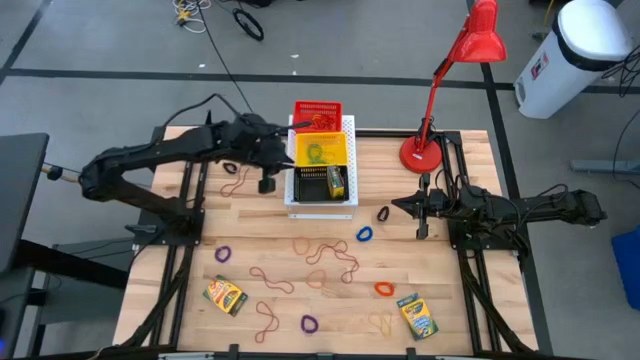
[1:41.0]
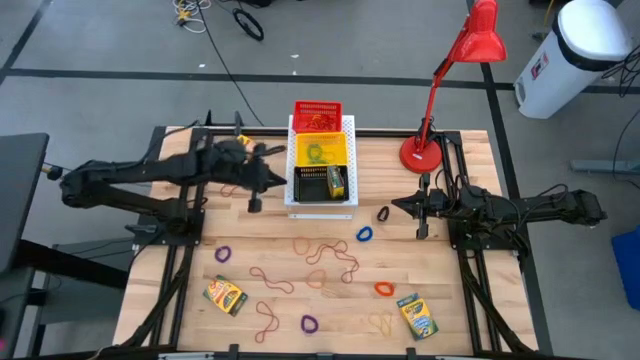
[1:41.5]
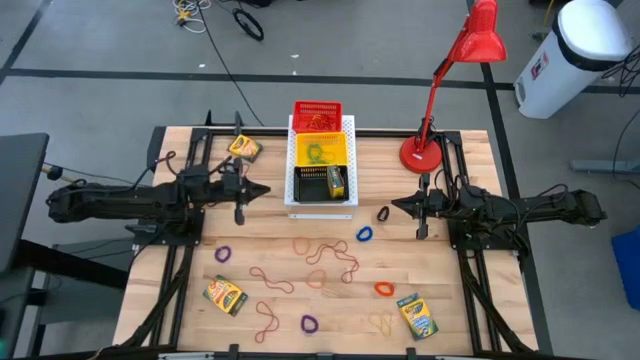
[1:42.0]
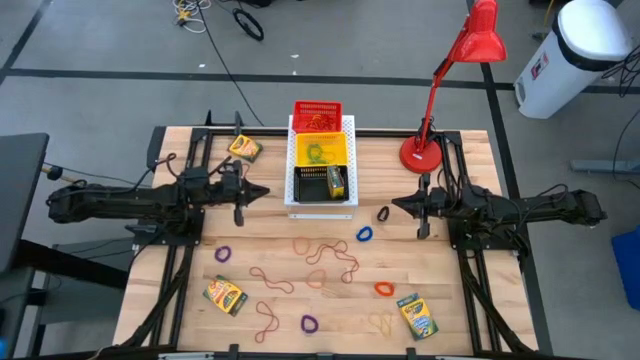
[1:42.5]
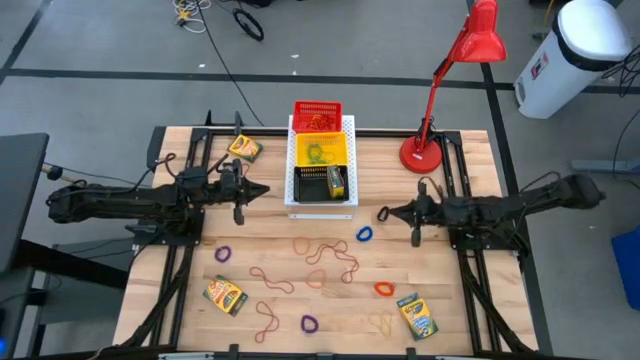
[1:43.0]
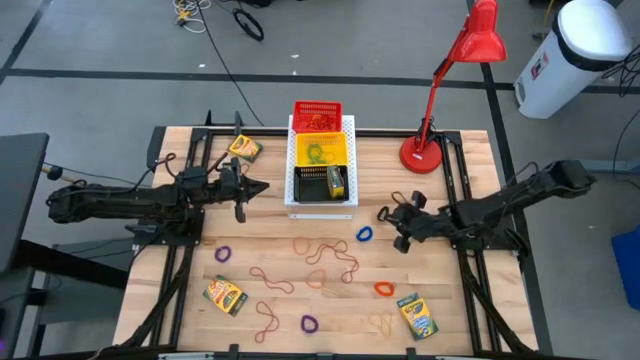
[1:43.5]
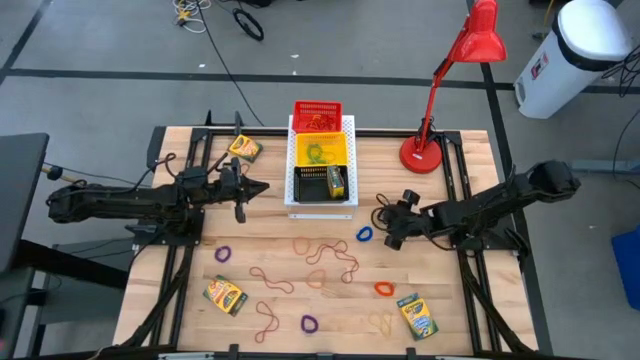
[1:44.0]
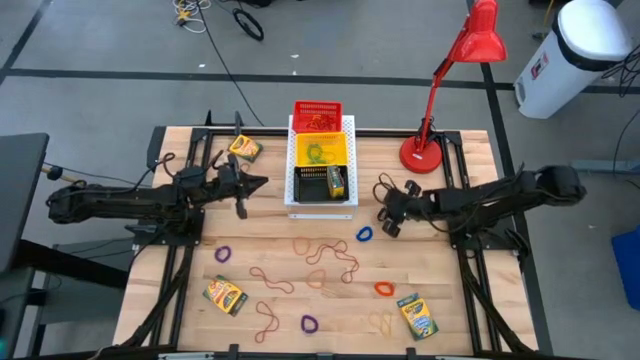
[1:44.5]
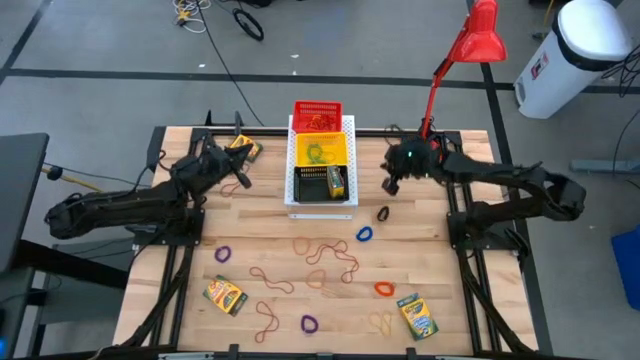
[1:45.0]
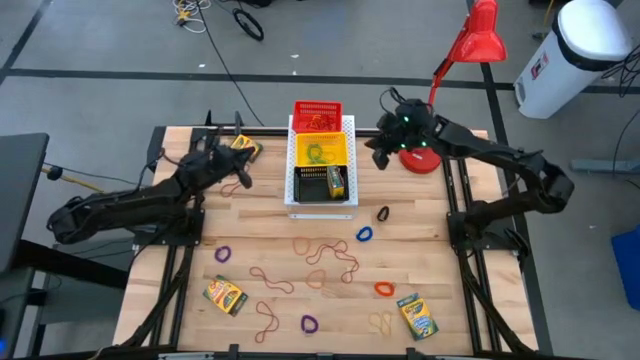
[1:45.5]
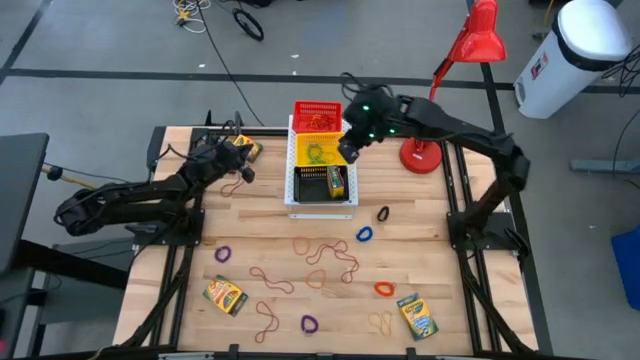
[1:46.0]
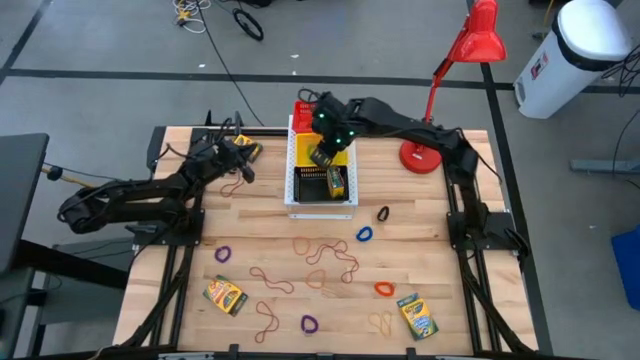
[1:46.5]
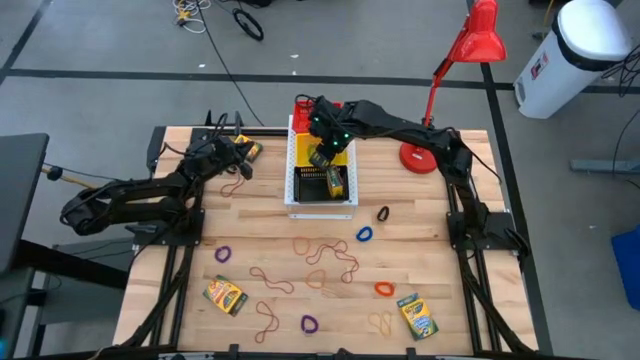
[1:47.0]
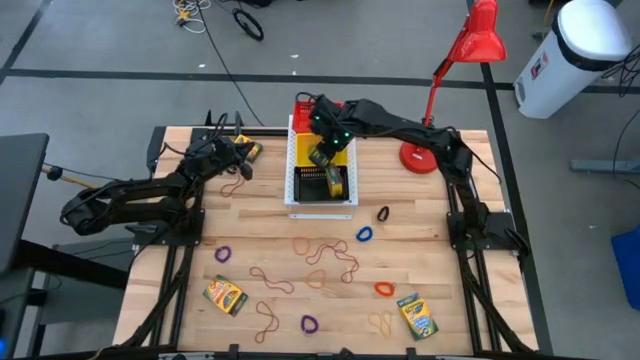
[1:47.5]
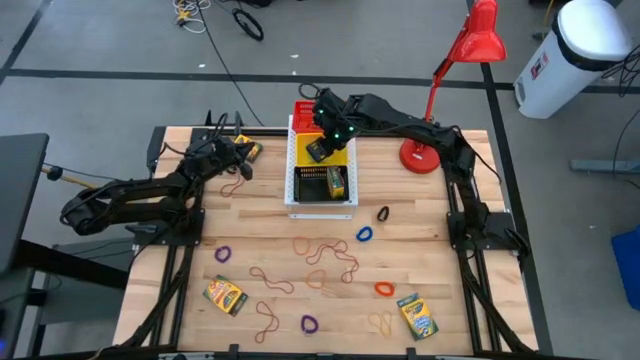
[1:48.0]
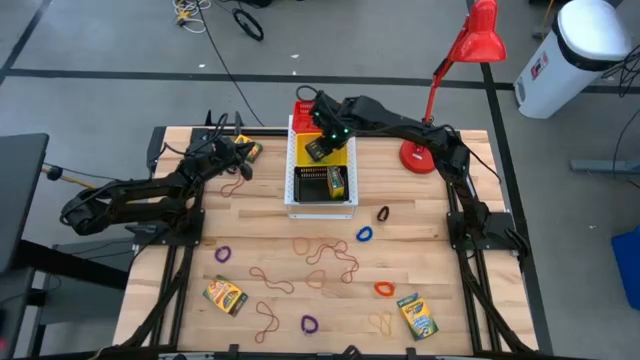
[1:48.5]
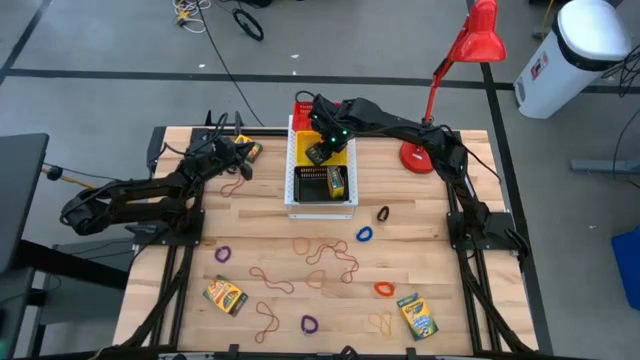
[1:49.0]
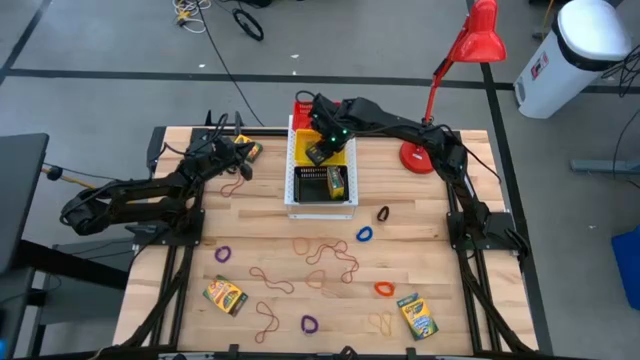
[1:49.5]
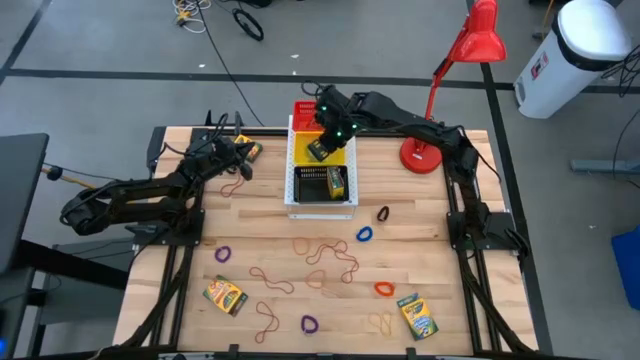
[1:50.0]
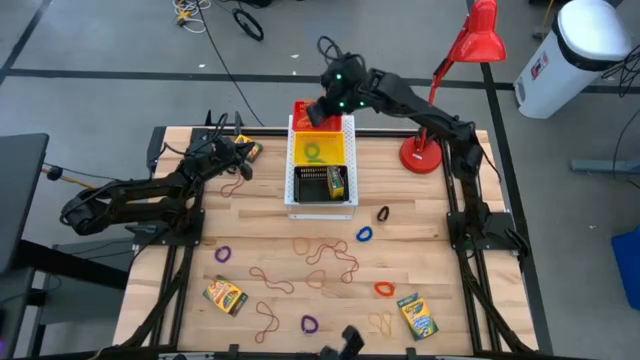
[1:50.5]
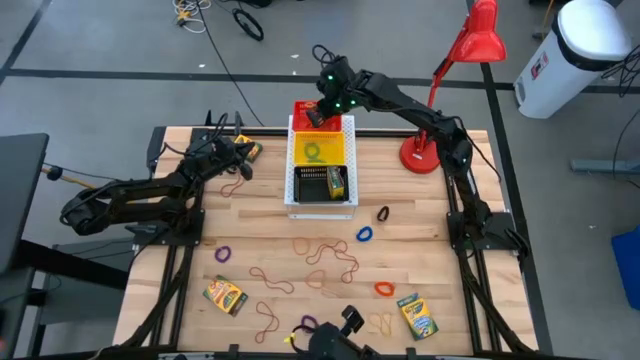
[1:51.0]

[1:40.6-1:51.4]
Task: Pick & Place Office Desk Supplies
Put the yellow rubber band into the red bin on the shelf

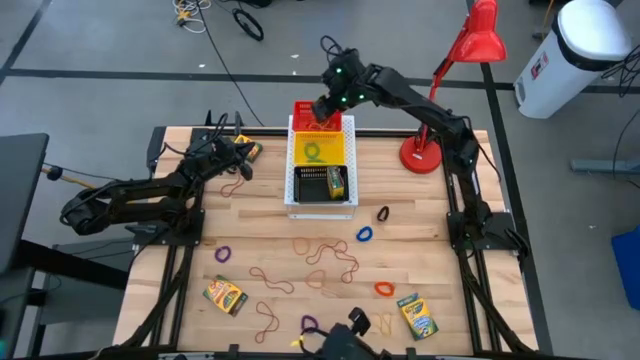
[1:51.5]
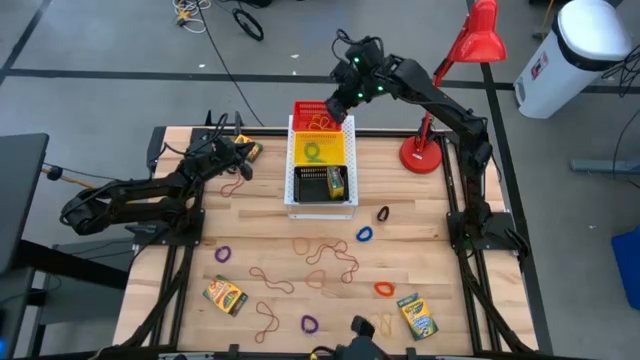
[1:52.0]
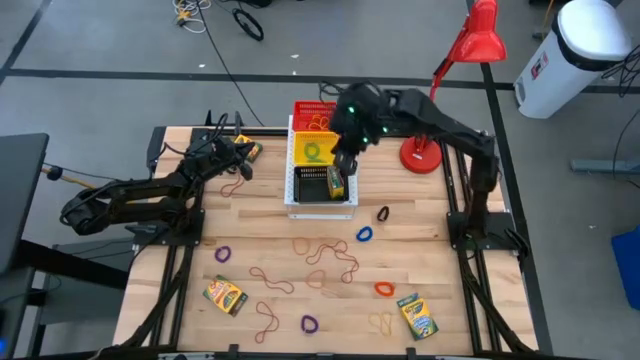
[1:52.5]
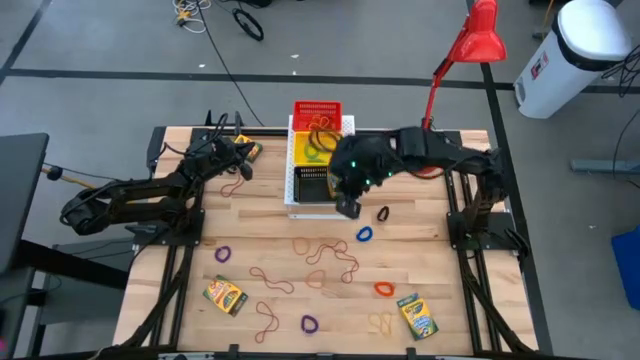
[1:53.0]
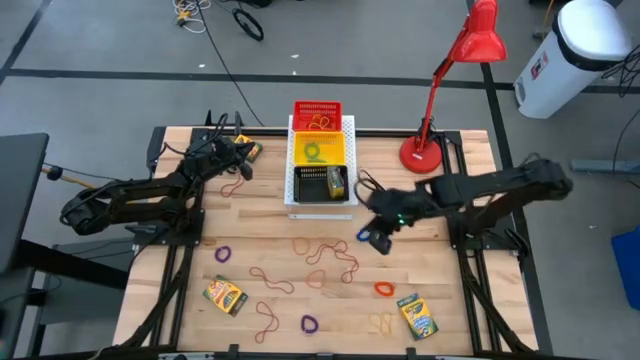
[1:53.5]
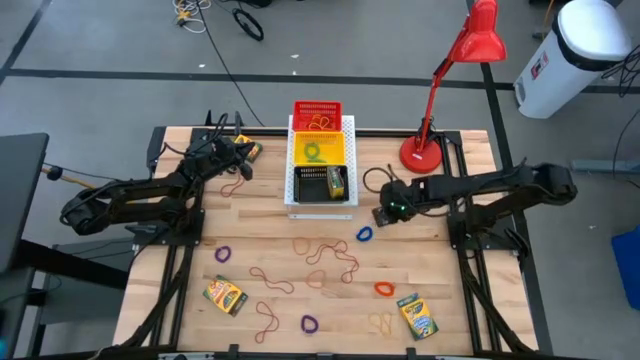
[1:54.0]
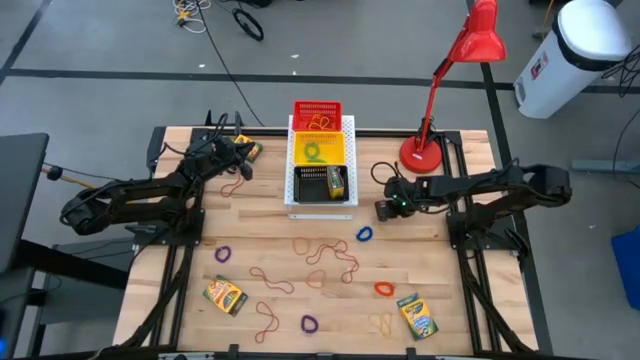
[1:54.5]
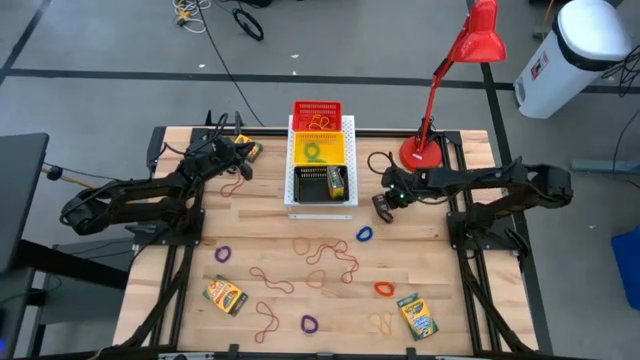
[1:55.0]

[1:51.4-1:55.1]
Put the black spring keychain into the yellow bin on the shelf

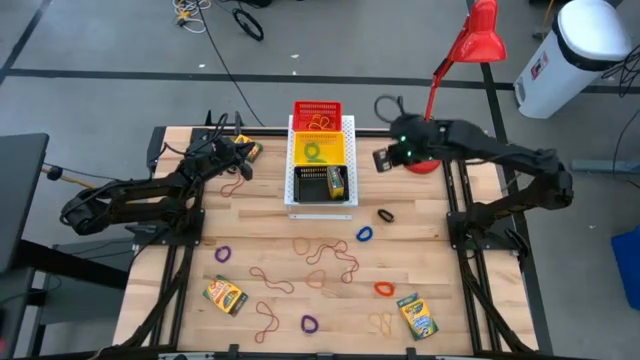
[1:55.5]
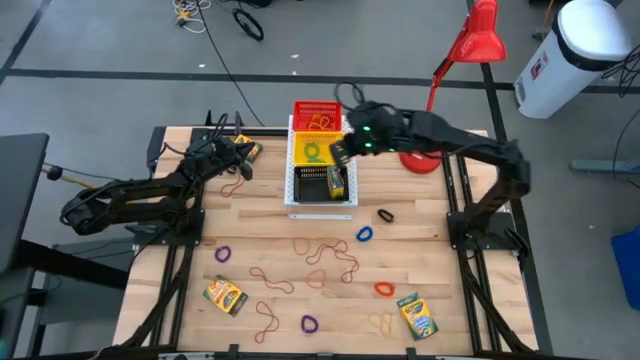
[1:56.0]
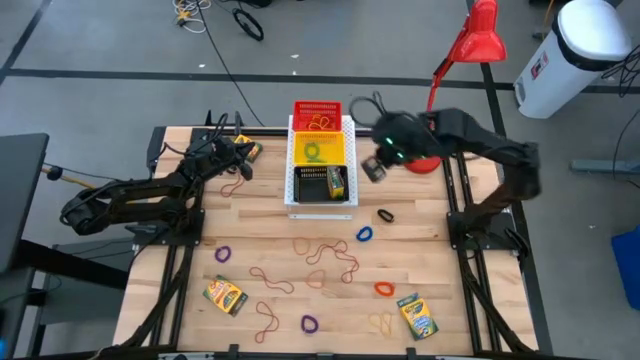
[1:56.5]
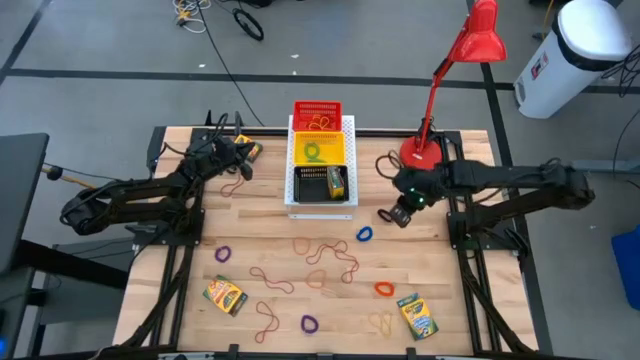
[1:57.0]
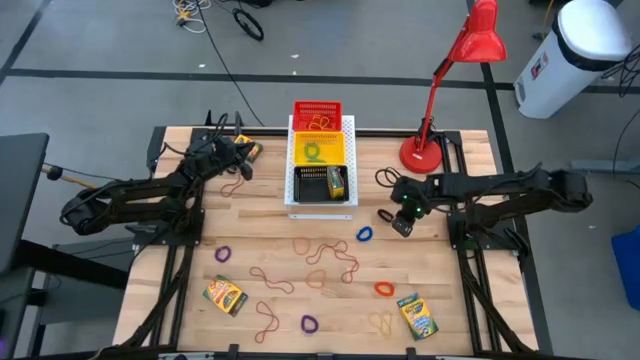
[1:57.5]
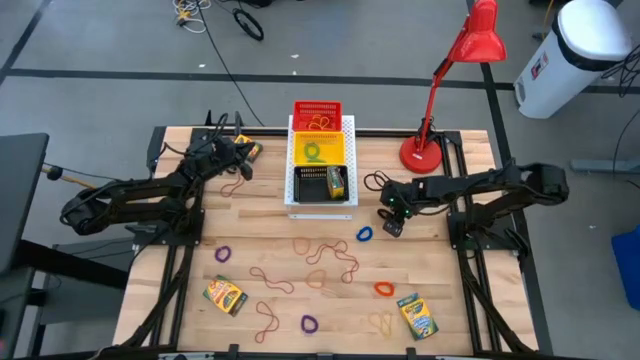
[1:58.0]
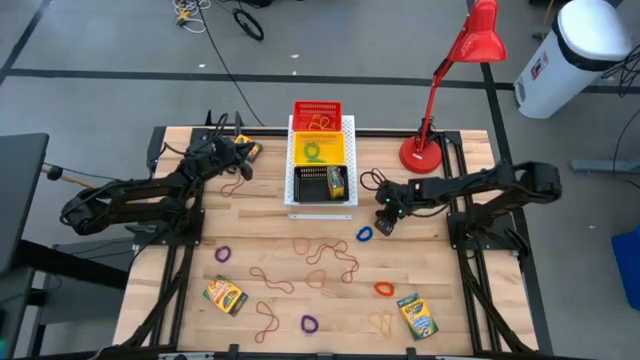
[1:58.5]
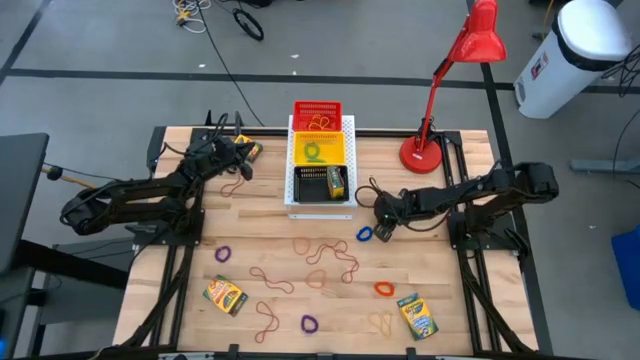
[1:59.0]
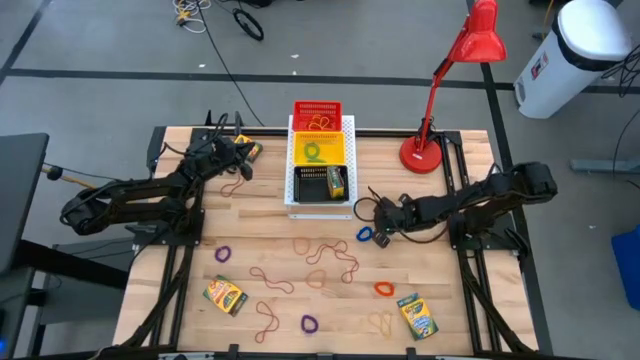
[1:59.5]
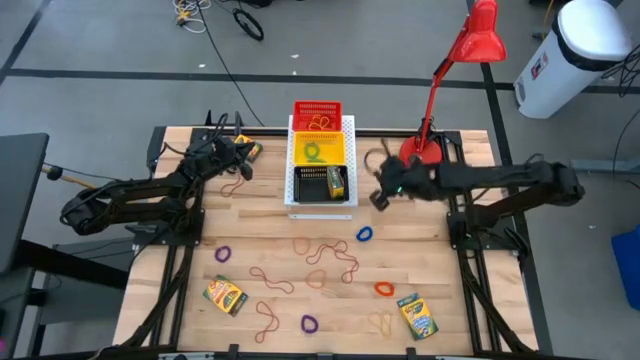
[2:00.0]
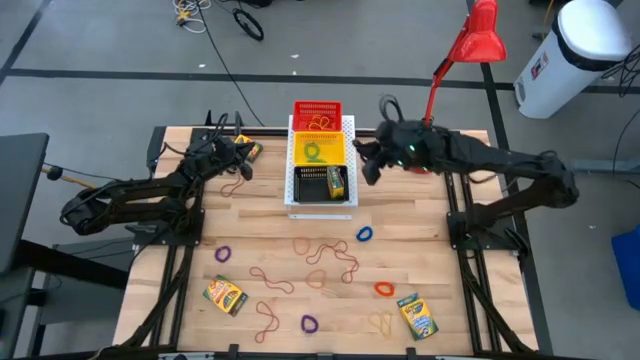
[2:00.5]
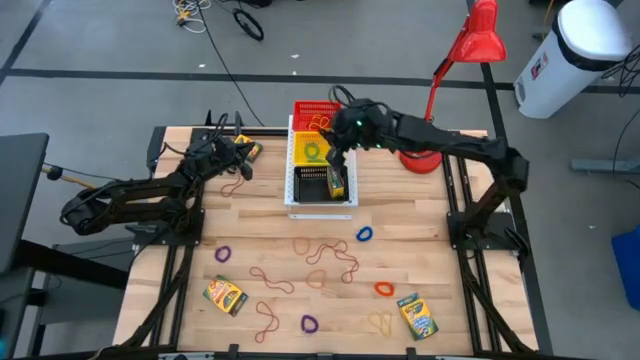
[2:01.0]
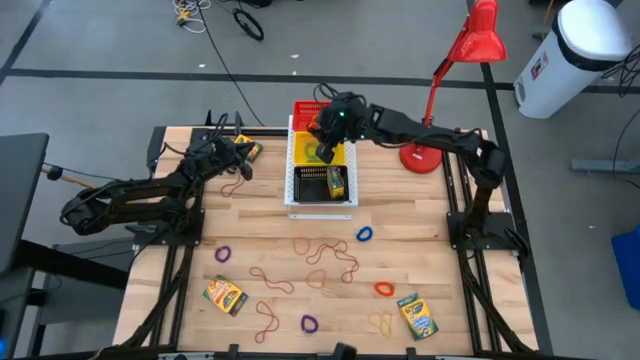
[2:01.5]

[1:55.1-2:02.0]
Put the black spring keychain into the yellow bin on the shelf
